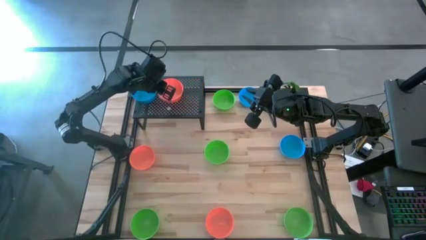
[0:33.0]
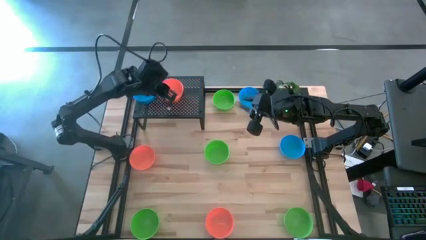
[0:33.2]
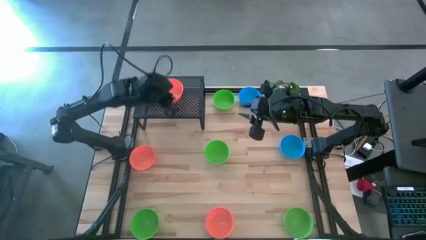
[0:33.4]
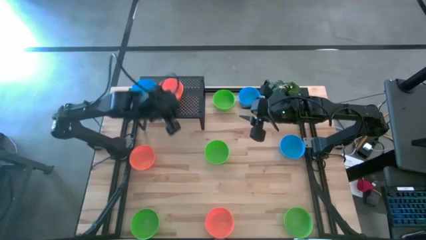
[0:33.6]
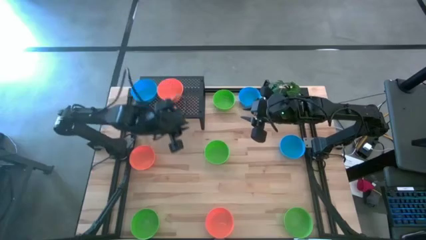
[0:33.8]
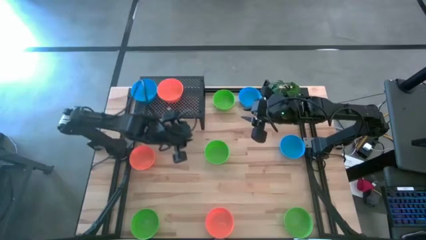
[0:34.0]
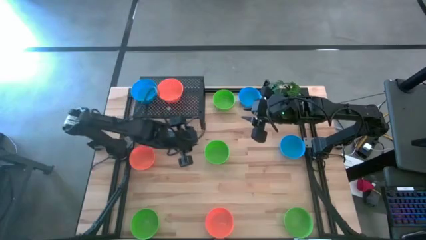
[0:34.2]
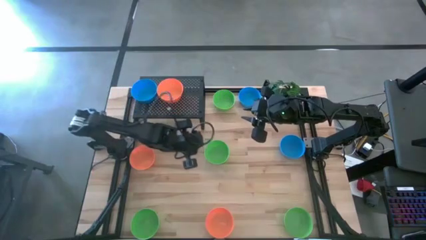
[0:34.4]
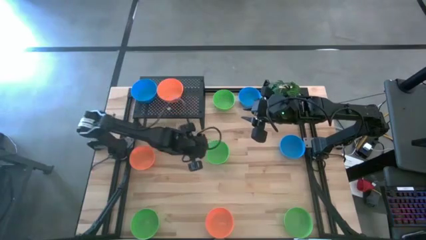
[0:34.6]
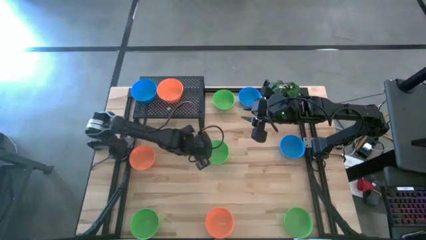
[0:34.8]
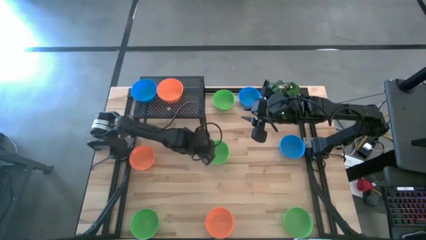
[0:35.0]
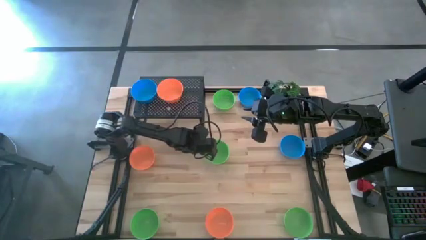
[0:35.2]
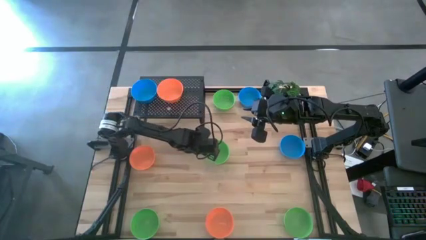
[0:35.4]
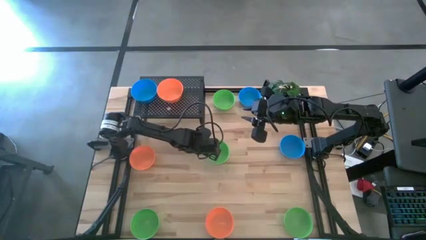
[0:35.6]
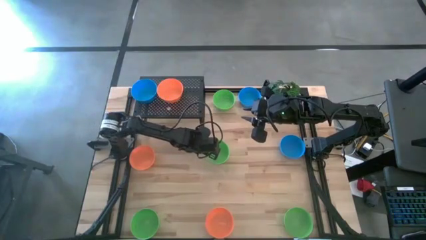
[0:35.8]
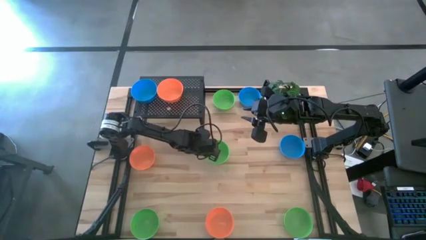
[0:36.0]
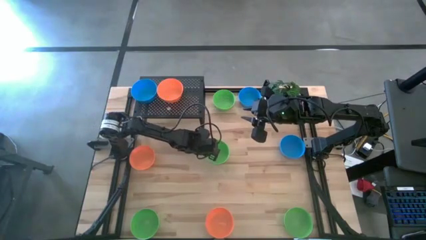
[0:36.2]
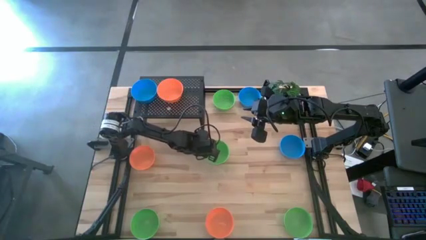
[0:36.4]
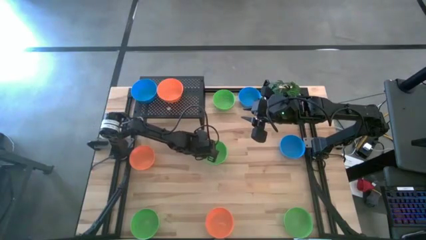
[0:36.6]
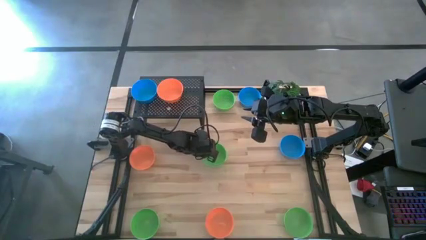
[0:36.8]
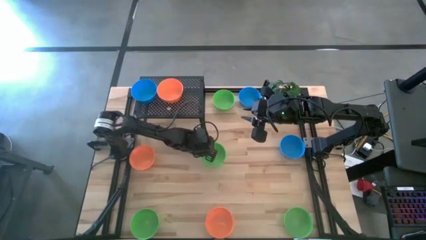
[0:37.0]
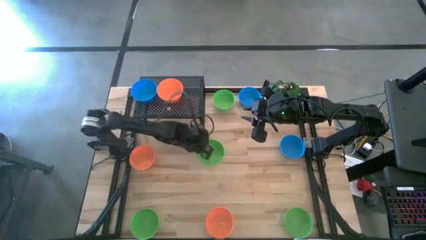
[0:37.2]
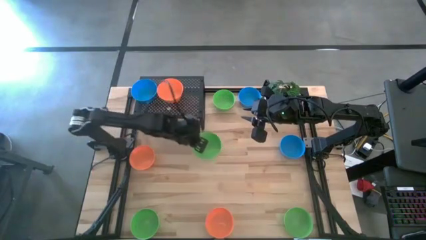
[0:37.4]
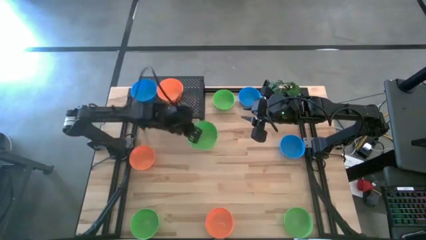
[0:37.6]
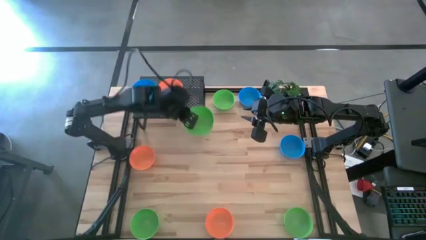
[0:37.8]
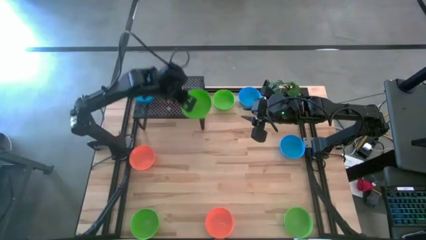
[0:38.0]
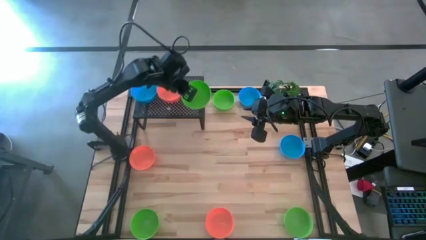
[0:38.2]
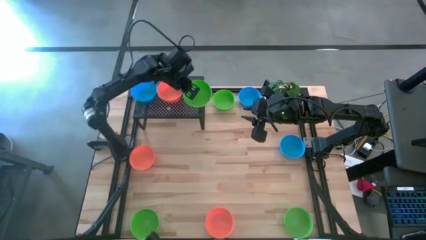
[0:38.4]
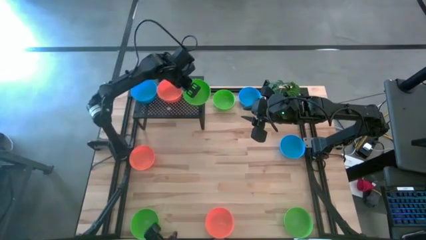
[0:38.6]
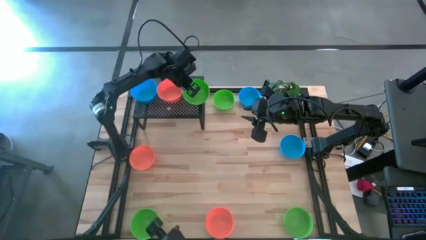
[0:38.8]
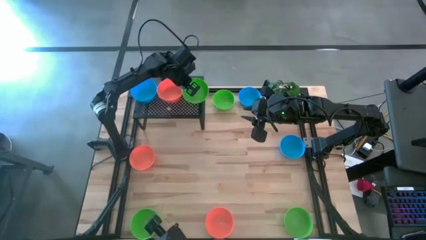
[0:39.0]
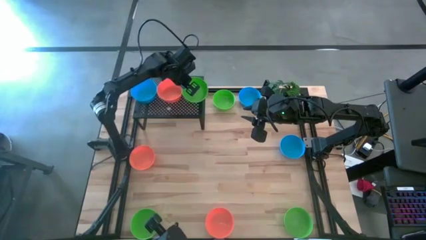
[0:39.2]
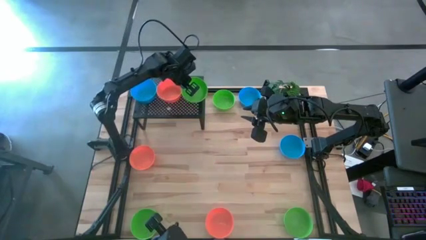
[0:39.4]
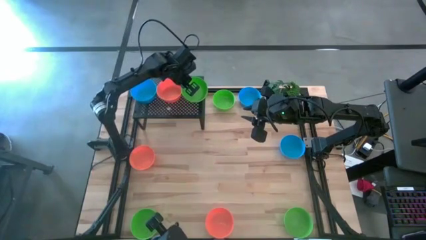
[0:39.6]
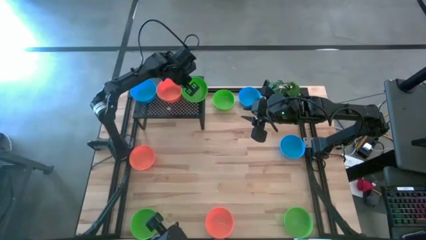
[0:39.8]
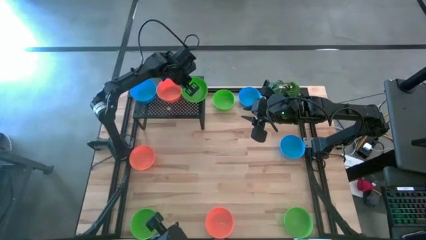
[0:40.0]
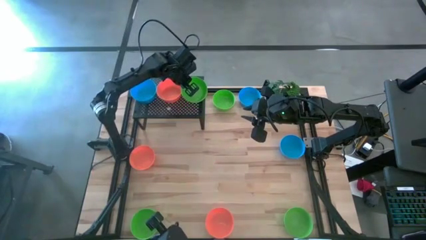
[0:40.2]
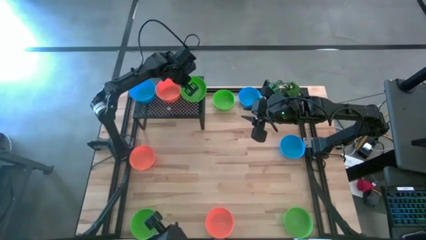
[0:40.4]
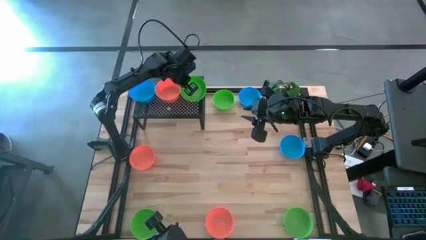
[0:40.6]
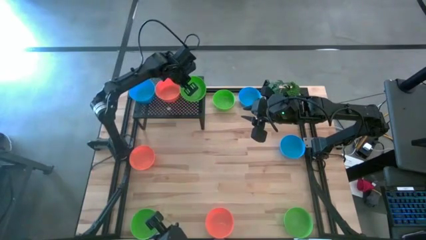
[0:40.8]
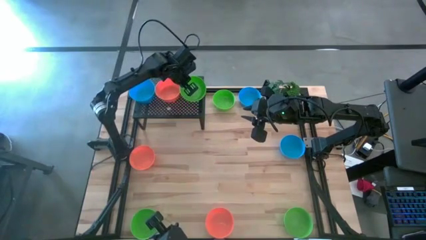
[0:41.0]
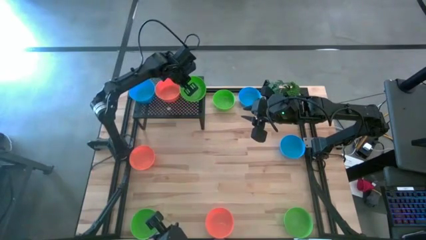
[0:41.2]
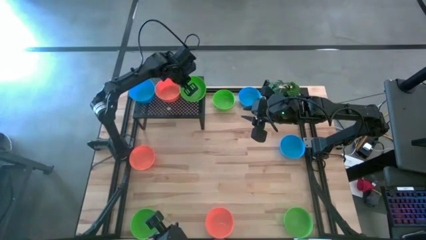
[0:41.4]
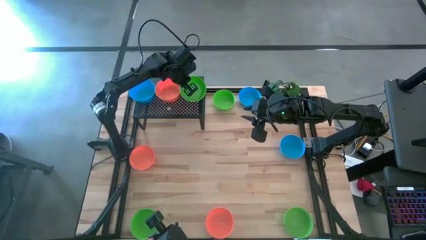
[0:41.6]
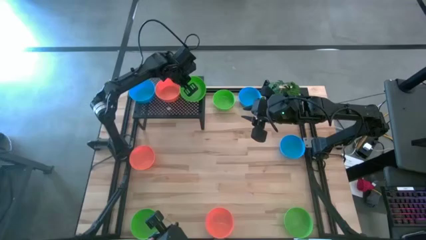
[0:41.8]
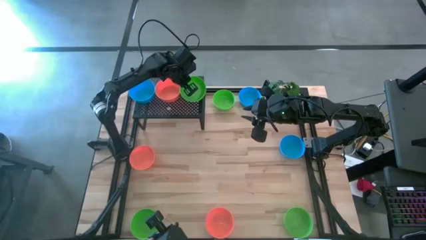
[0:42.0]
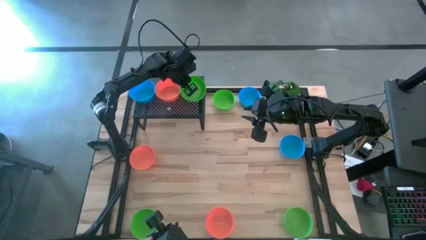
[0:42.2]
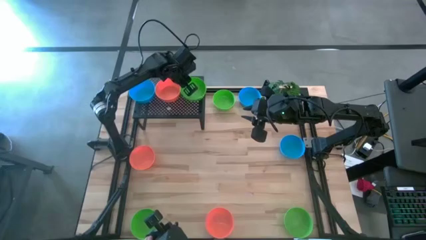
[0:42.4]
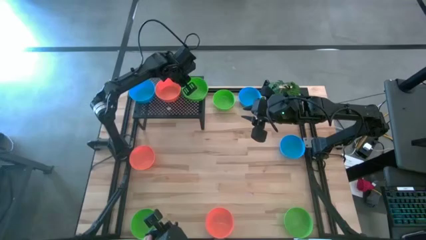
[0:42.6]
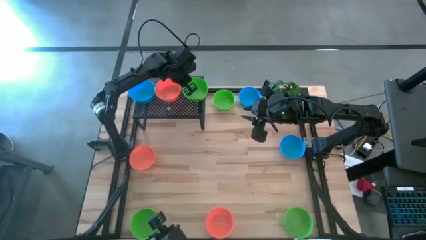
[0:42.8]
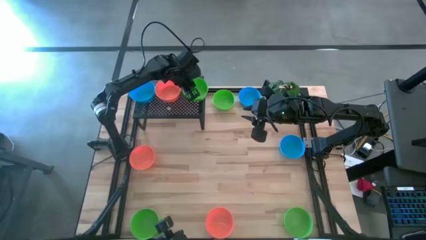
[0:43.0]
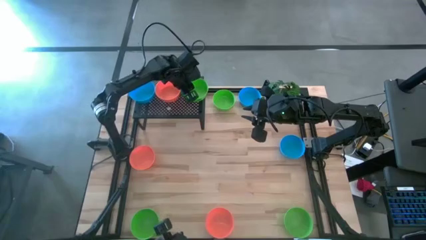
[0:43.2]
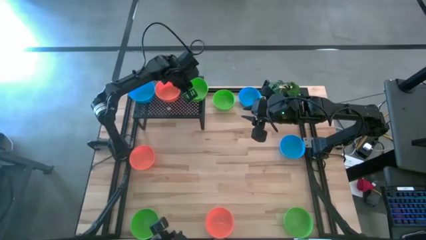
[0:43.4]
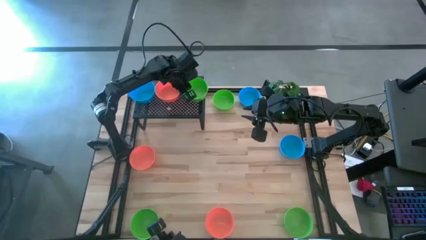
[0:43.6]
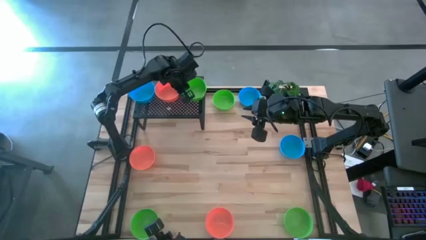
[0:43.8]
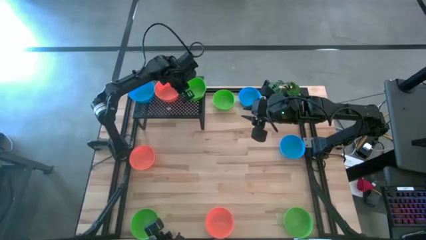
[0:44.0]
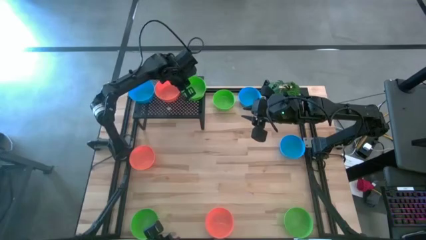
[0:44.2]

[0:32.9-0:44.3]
Task: Pick & Place Mini bowls
Put the green bowl on the shelf
